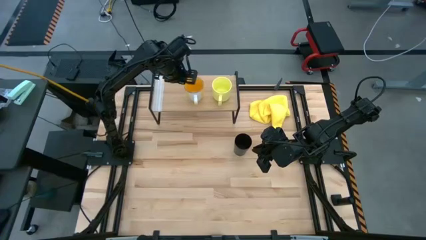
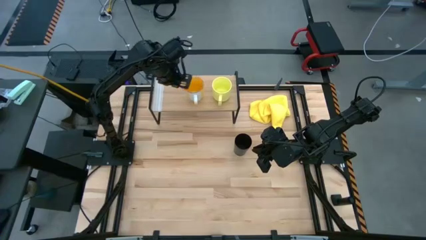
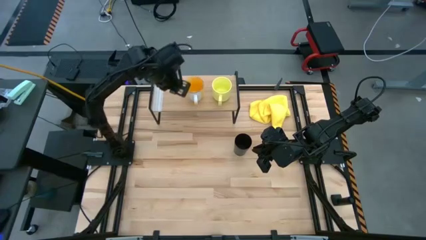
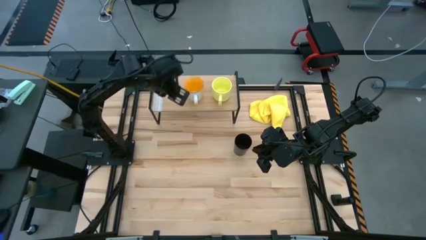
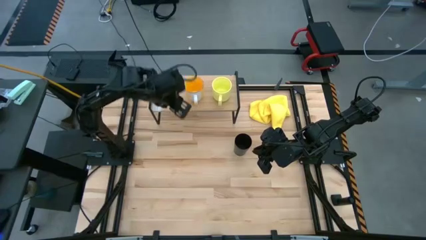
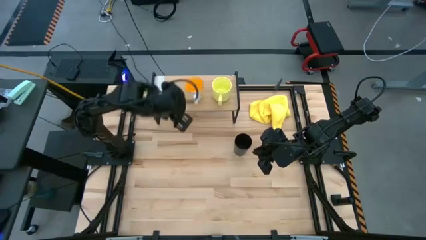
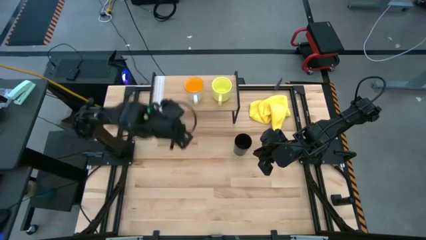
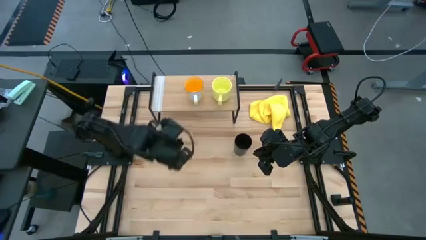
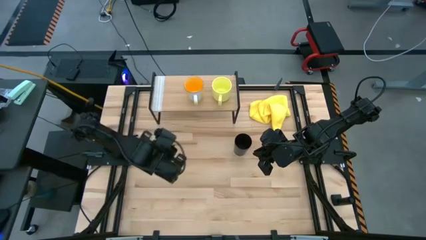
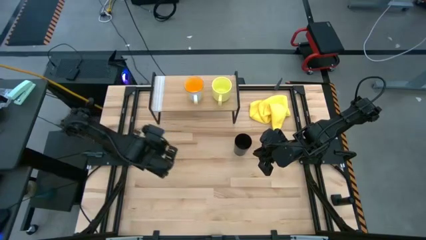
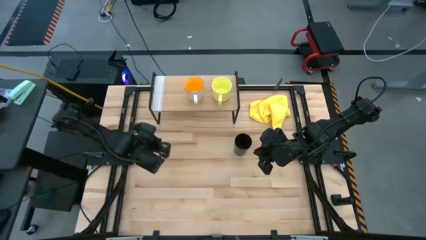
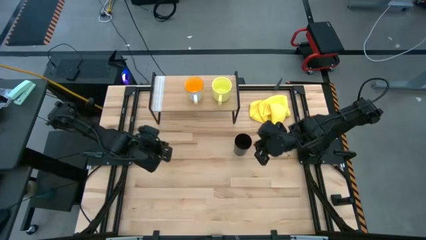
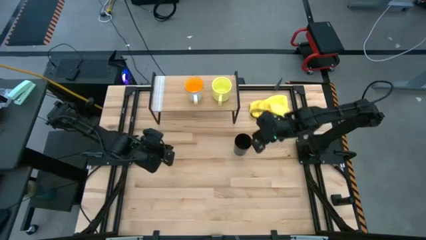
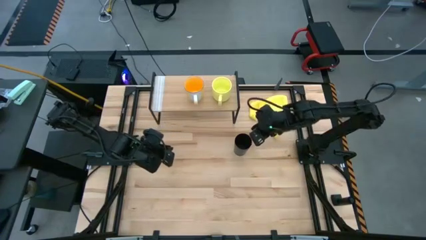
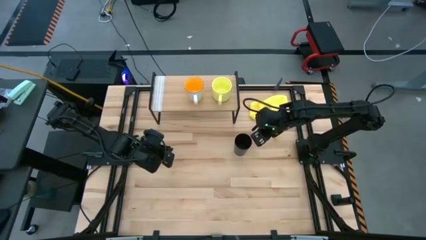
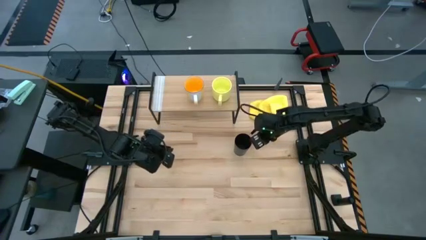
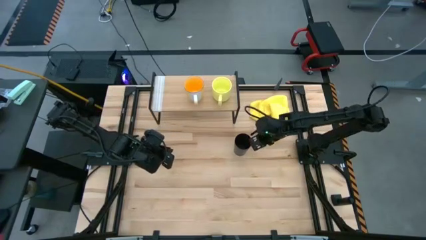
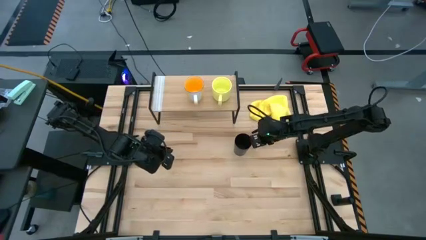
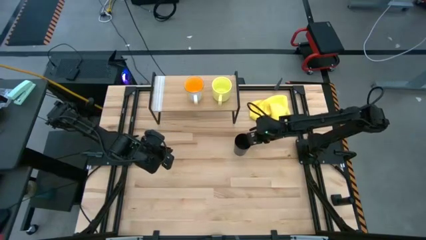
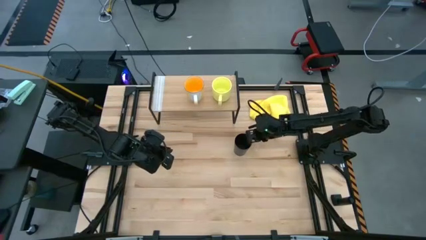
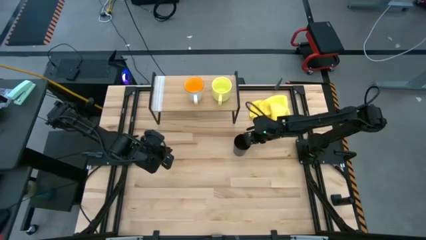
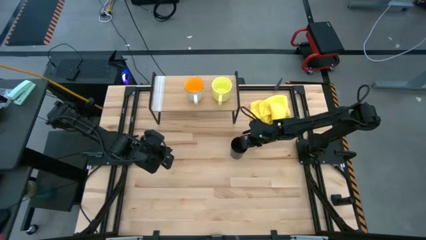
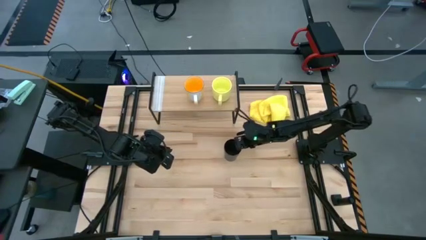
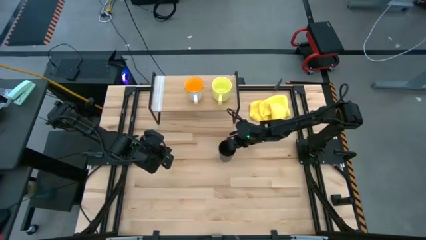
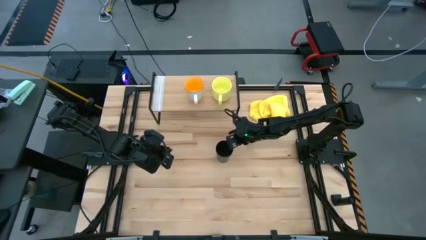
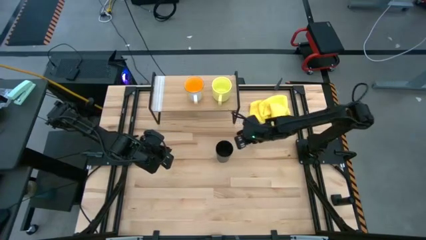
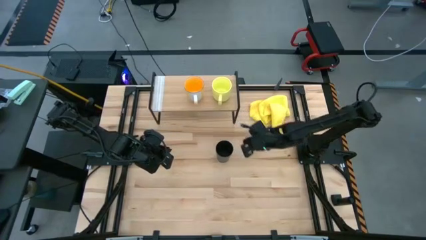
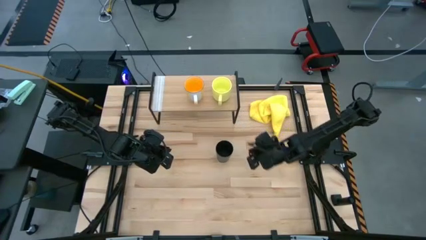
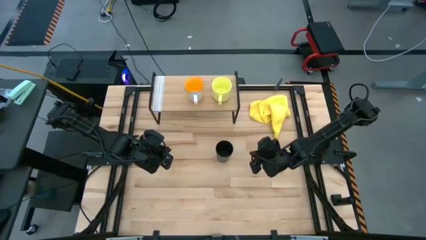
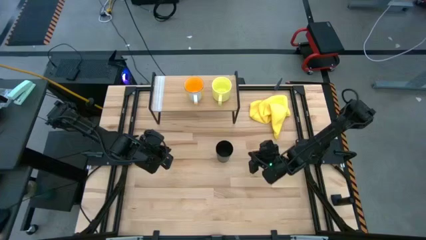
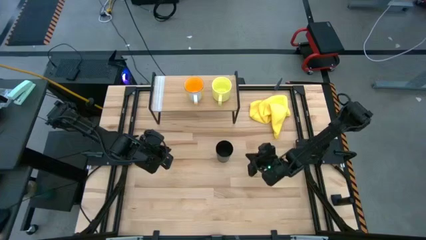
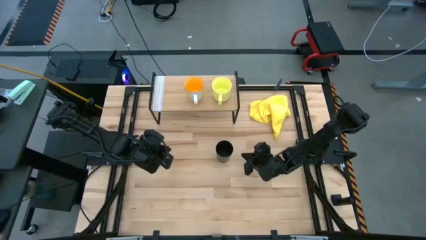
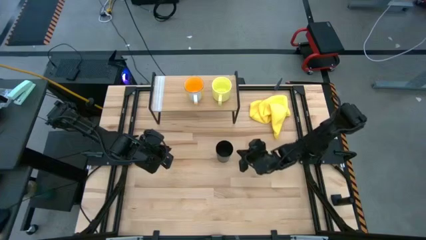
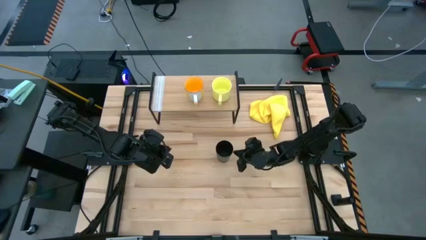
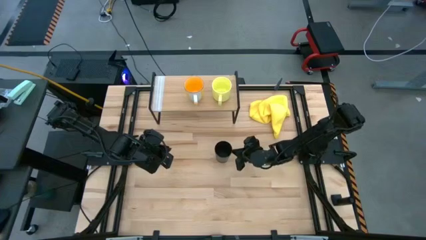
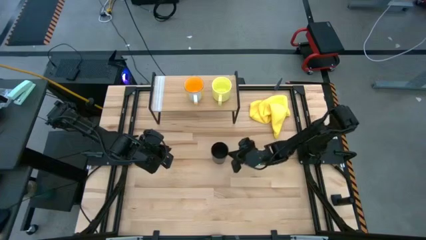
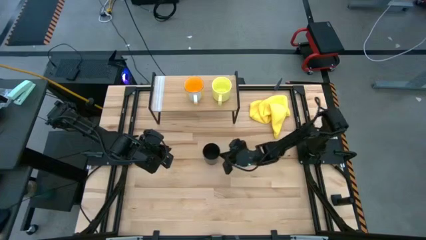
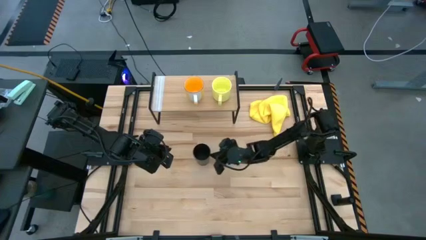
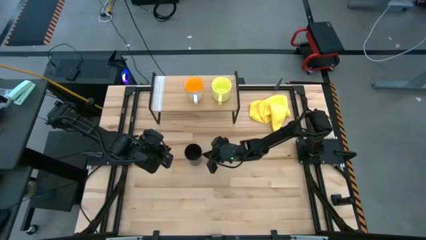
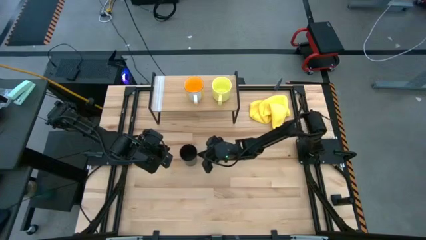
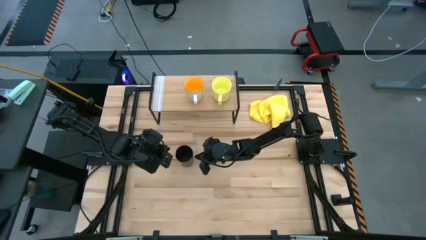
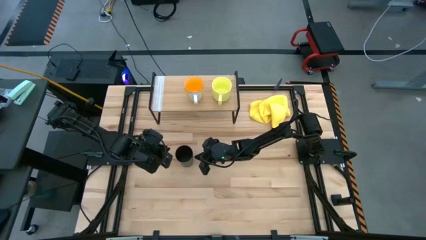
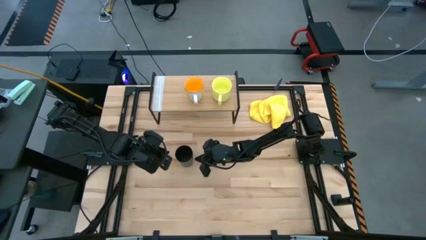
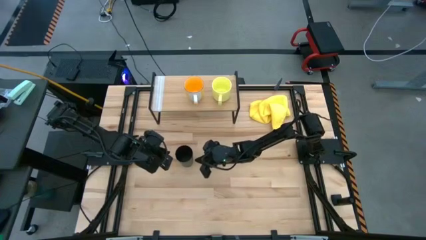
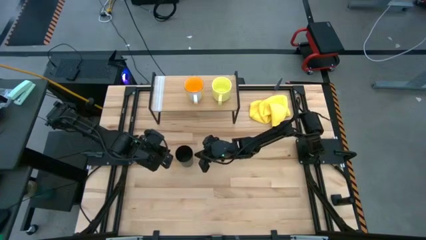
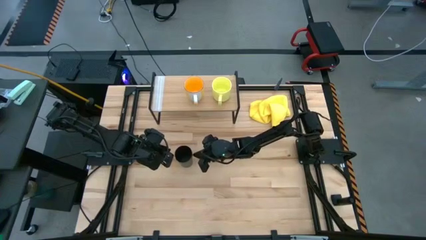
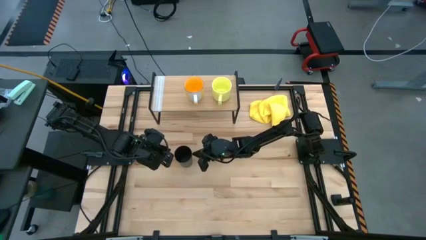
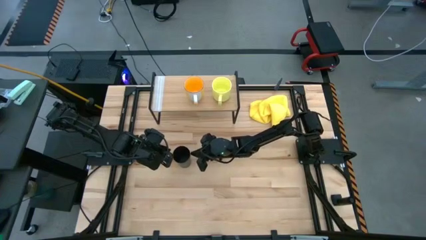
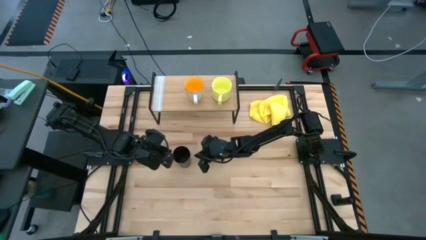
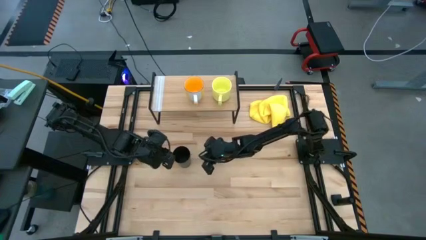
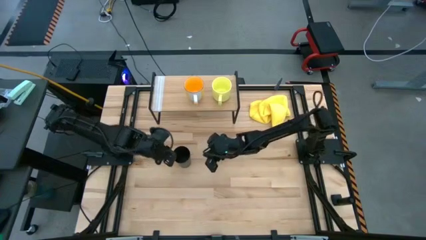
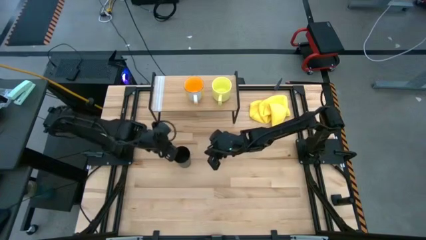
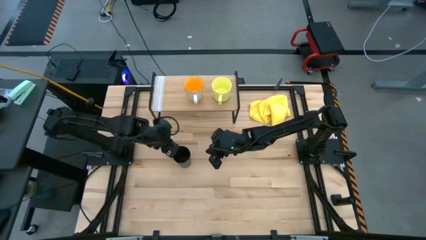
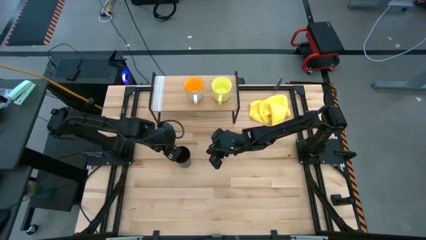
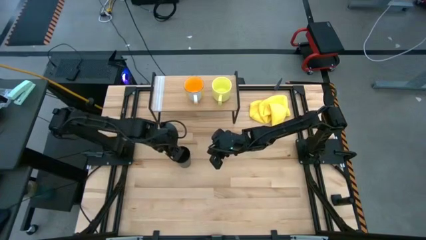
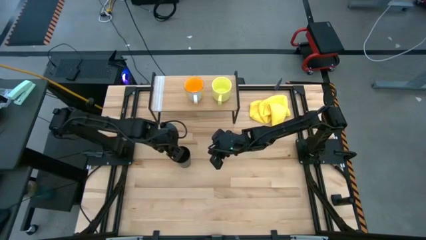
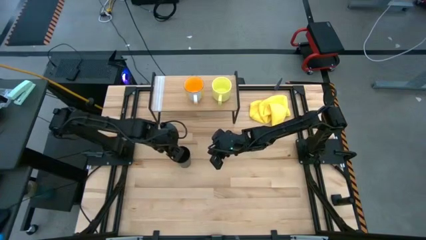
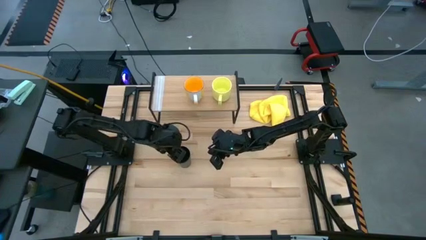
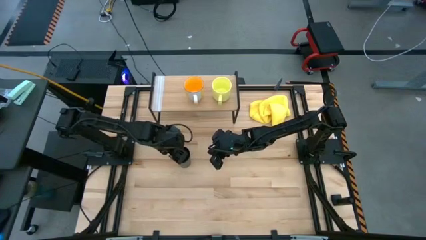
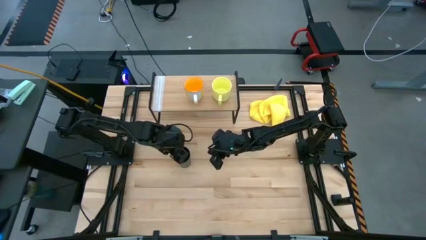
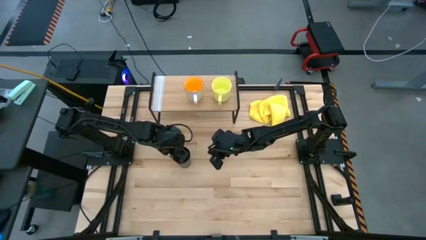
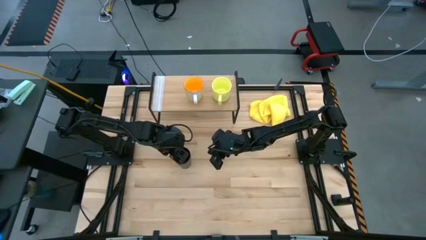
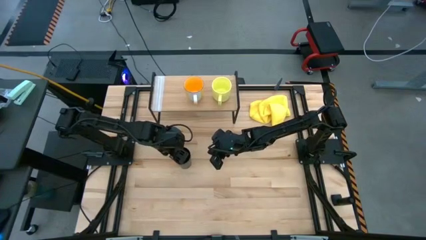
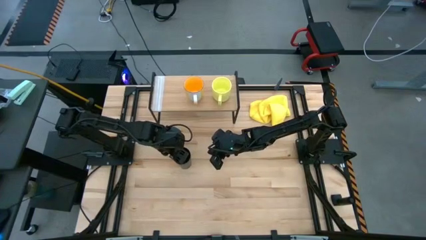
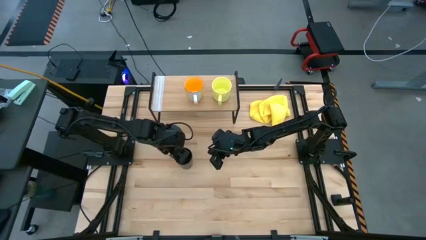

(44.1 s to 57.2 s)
Task: Stack small to large cups/mugs on shelf
Put the black cup on the shelf

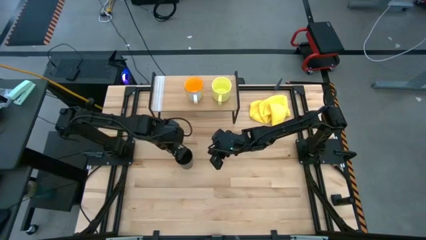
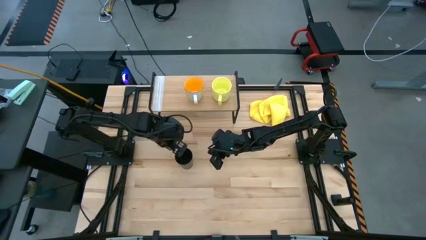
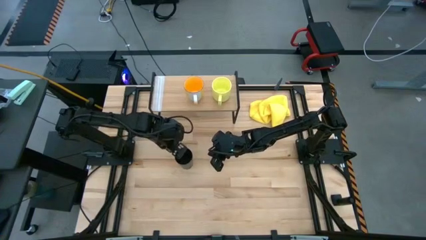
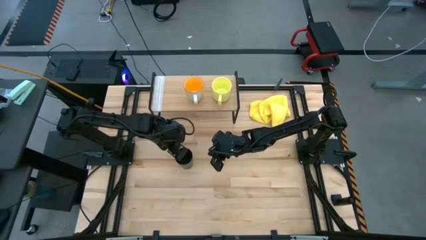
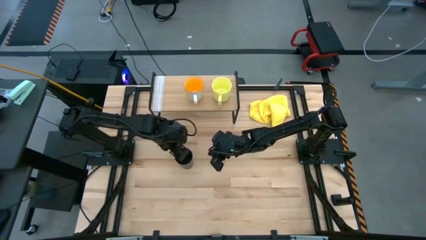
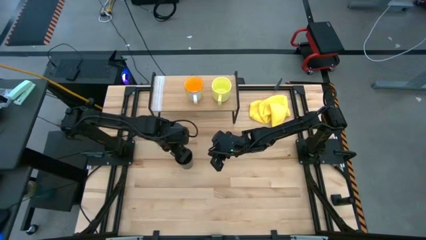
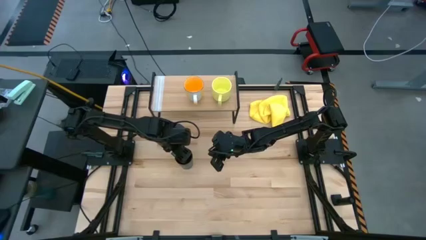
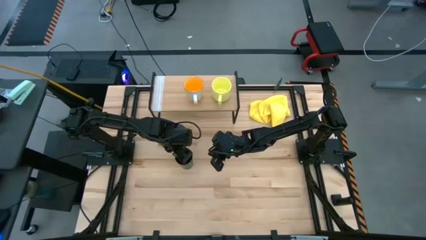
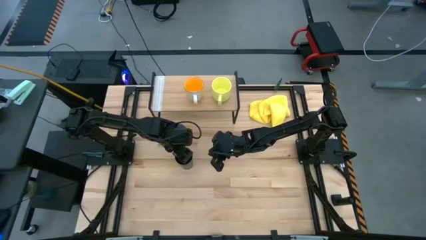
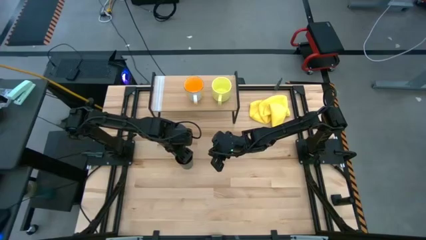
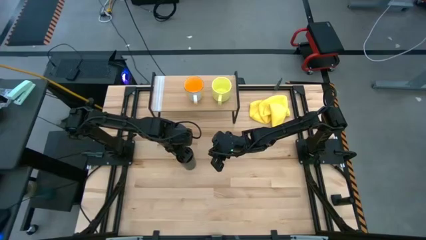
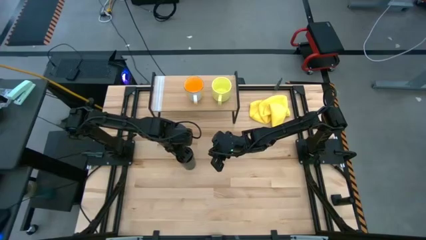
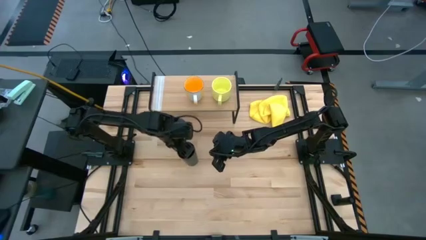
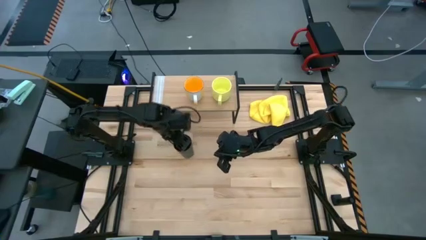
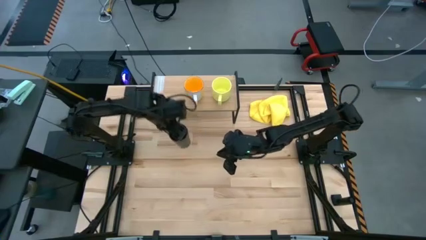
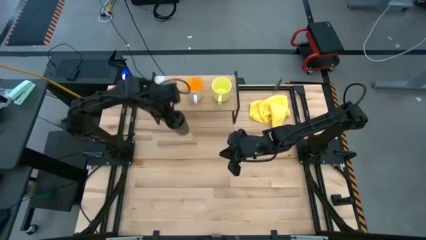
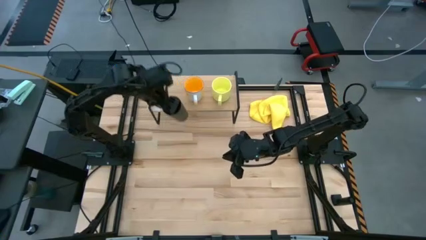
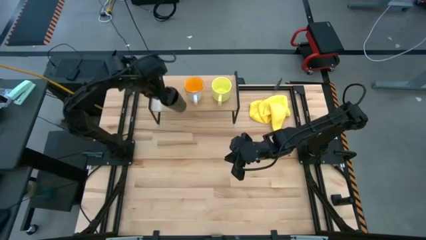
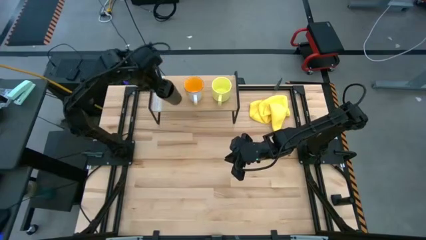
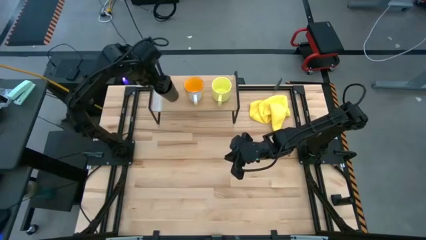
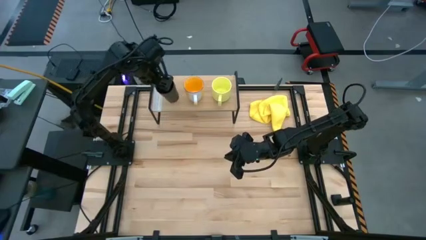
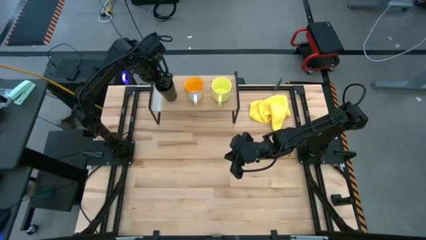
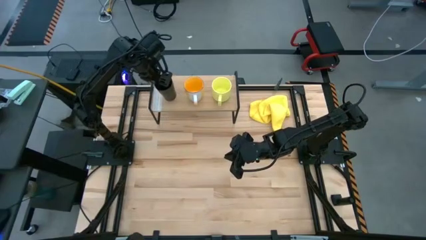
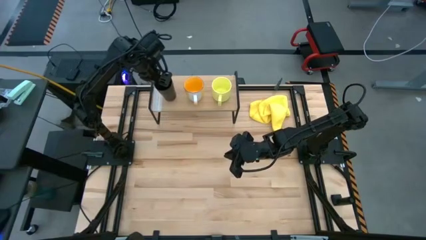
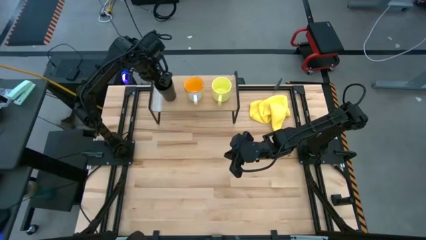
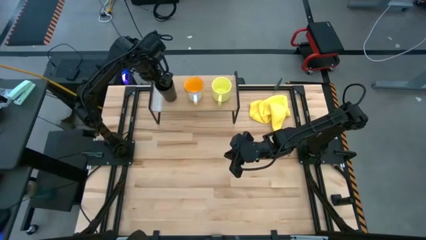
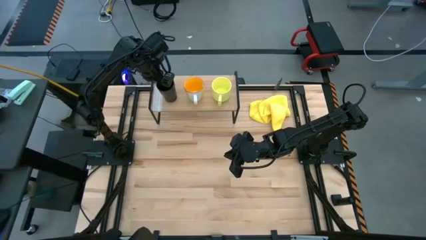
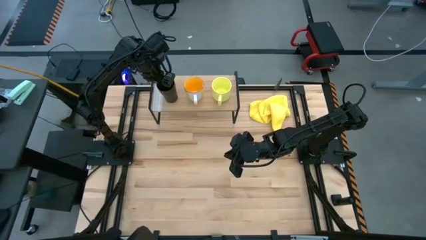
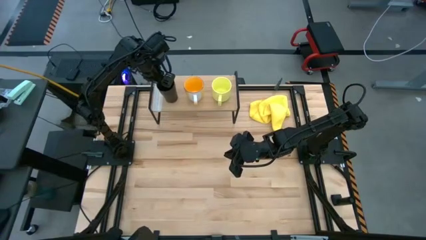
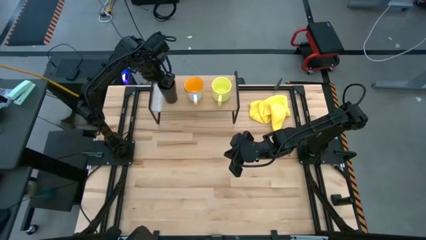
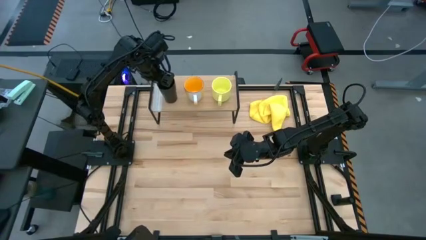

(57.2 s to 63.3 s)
Put the black cup on the shelf
